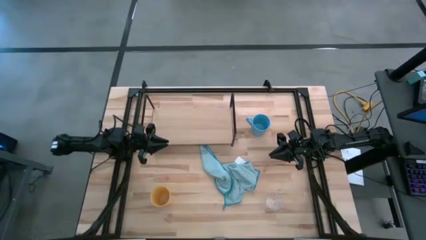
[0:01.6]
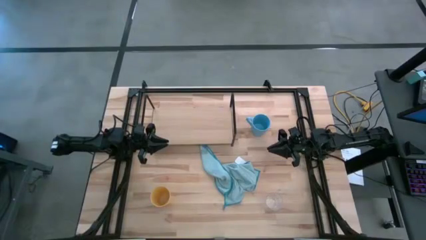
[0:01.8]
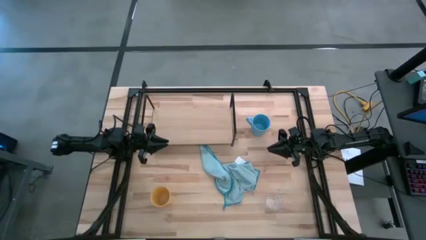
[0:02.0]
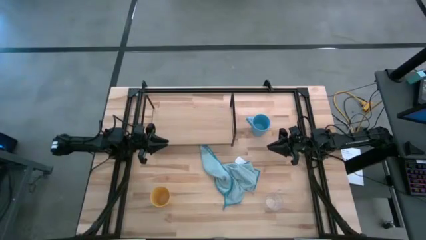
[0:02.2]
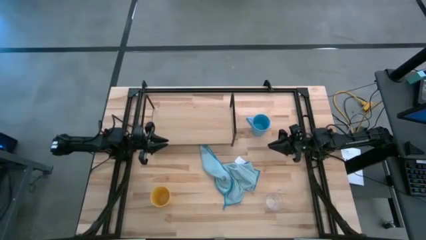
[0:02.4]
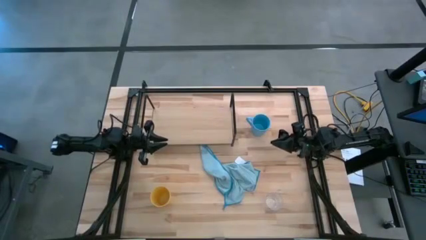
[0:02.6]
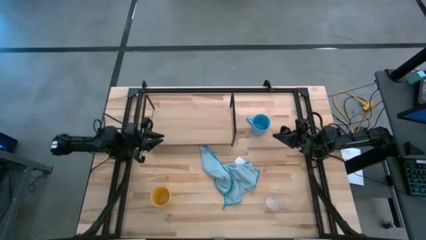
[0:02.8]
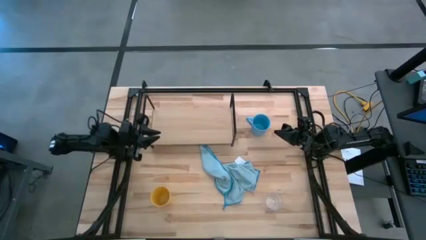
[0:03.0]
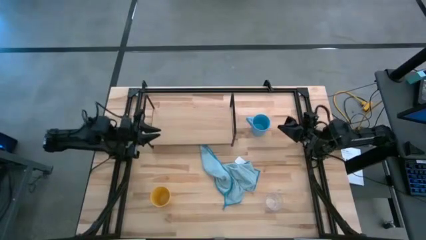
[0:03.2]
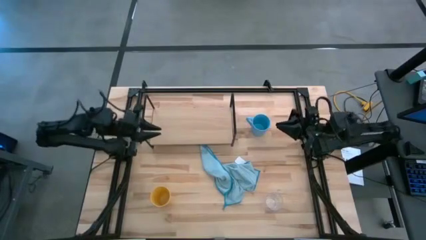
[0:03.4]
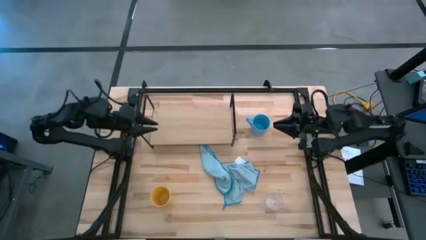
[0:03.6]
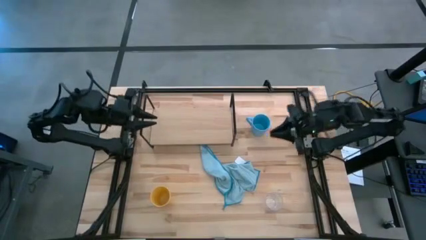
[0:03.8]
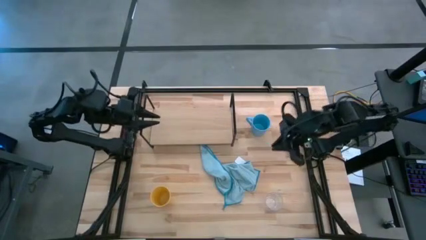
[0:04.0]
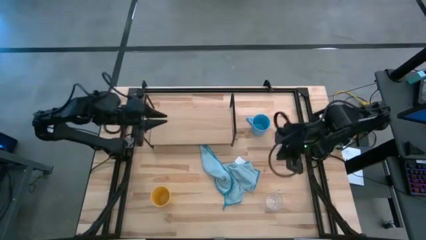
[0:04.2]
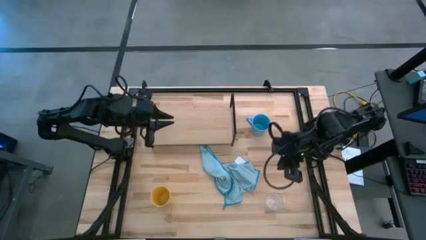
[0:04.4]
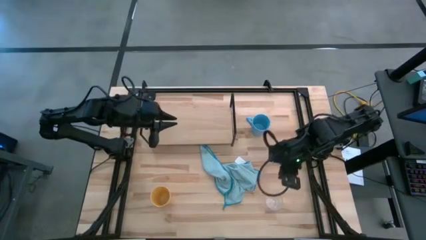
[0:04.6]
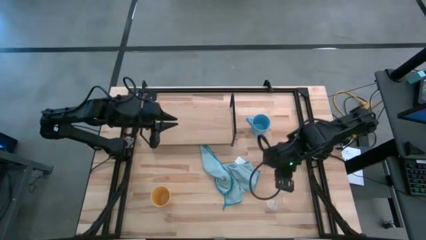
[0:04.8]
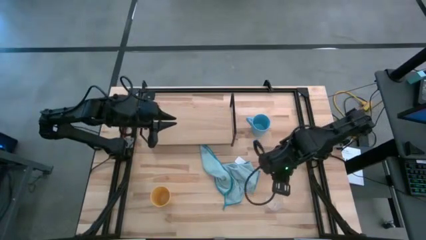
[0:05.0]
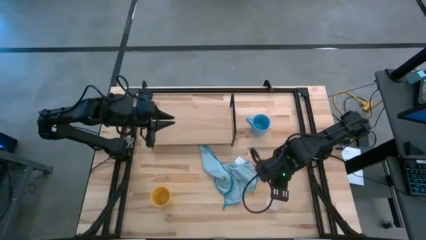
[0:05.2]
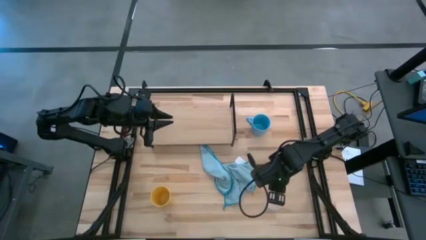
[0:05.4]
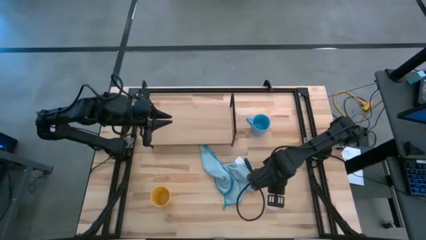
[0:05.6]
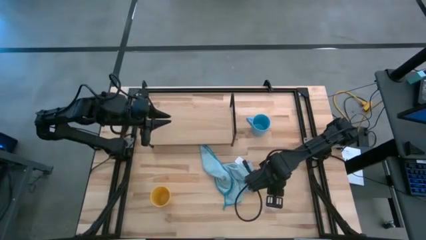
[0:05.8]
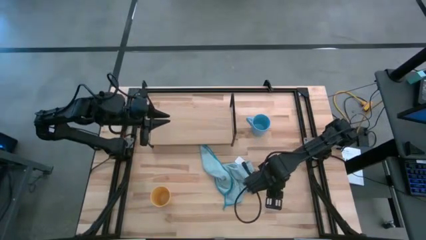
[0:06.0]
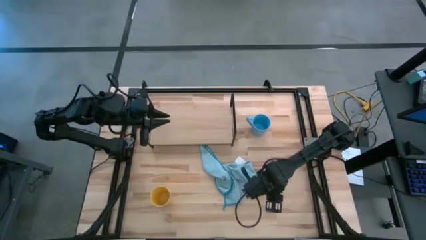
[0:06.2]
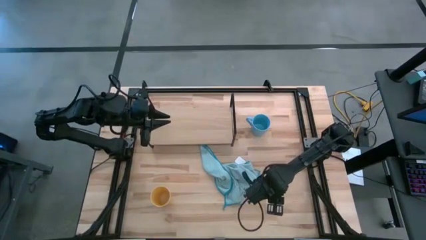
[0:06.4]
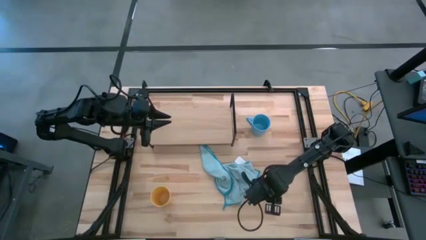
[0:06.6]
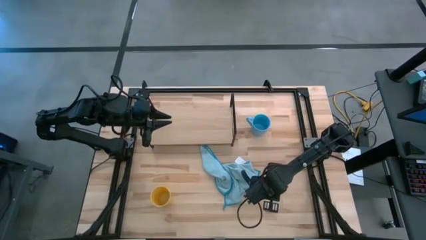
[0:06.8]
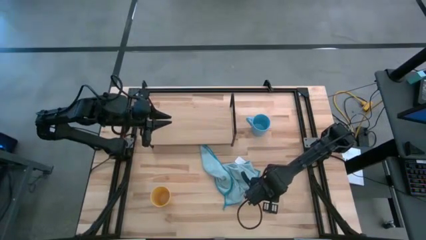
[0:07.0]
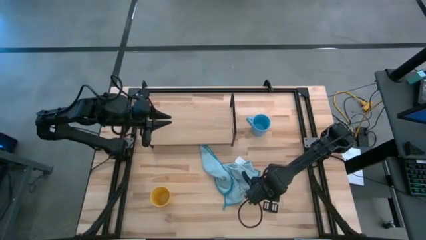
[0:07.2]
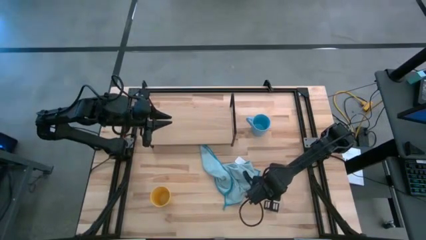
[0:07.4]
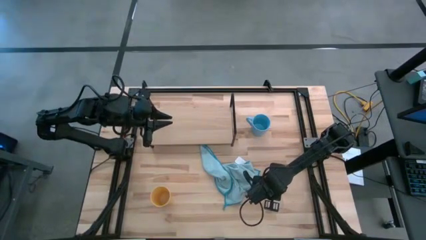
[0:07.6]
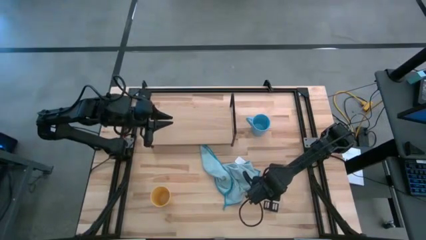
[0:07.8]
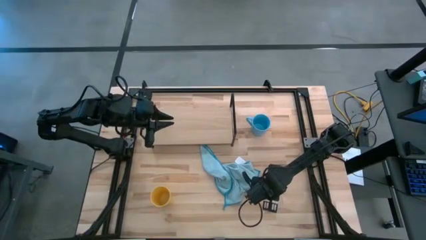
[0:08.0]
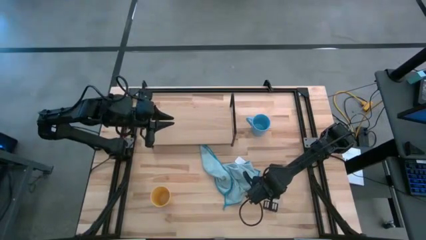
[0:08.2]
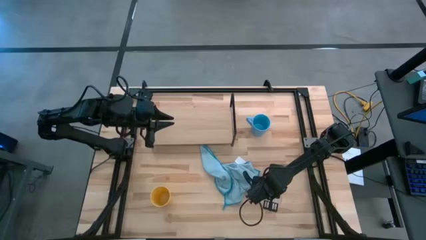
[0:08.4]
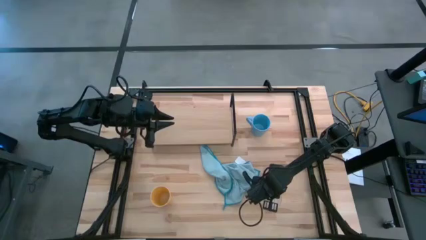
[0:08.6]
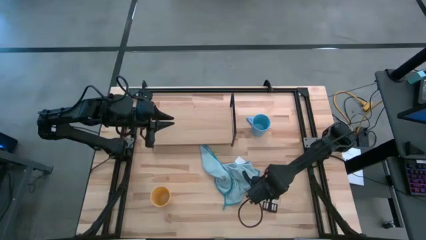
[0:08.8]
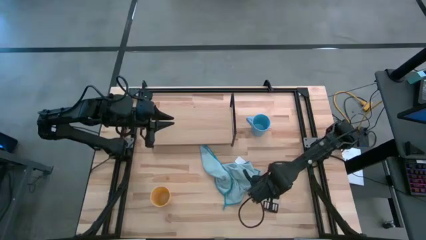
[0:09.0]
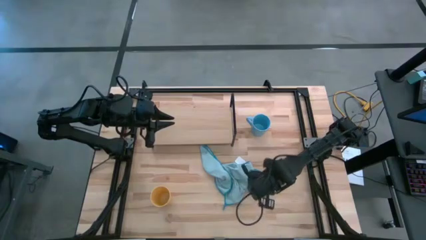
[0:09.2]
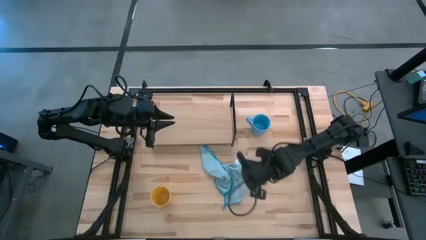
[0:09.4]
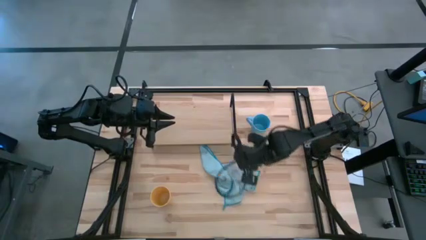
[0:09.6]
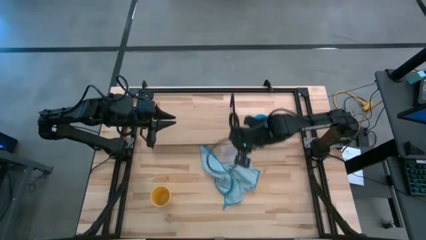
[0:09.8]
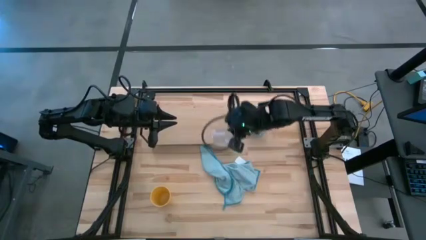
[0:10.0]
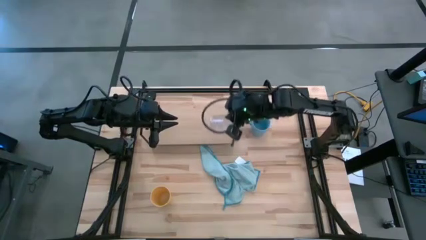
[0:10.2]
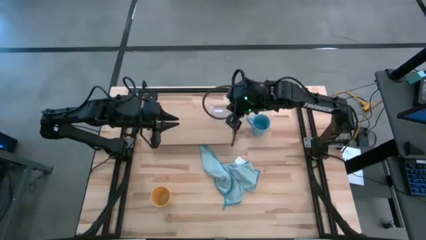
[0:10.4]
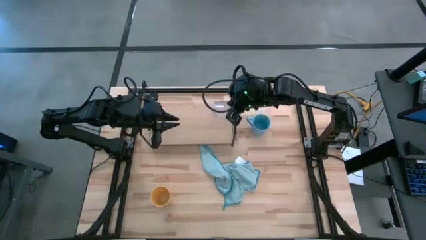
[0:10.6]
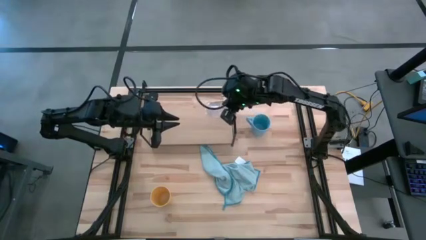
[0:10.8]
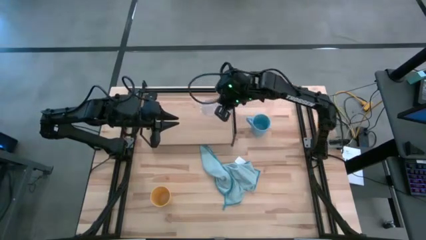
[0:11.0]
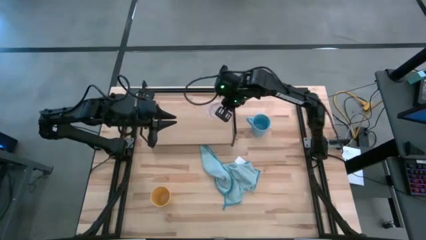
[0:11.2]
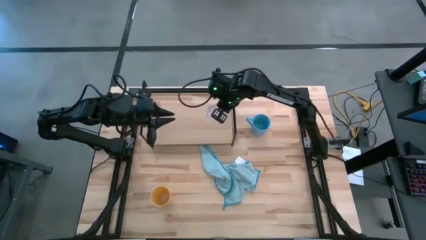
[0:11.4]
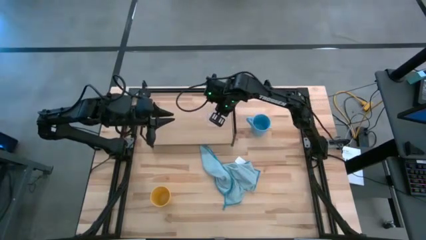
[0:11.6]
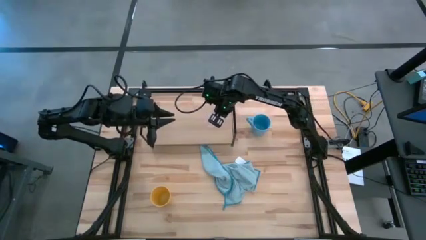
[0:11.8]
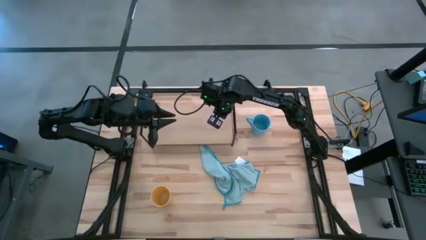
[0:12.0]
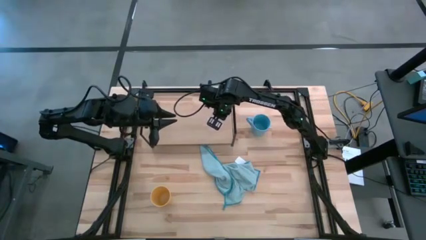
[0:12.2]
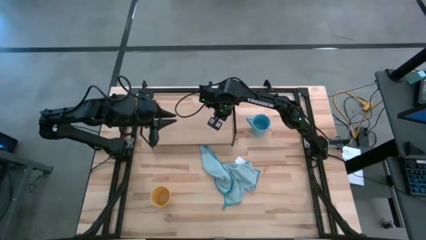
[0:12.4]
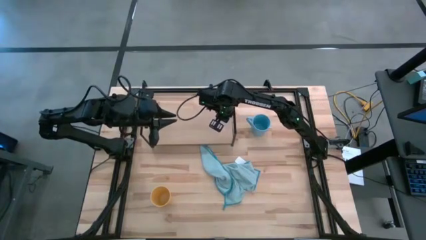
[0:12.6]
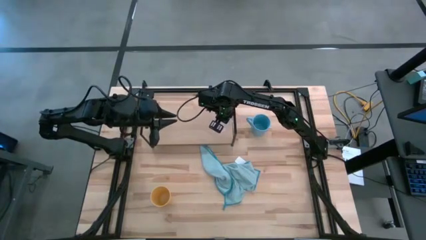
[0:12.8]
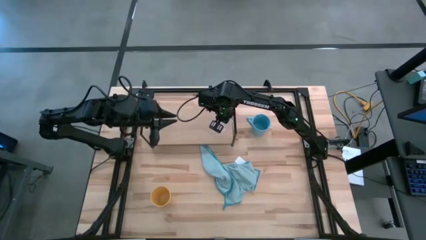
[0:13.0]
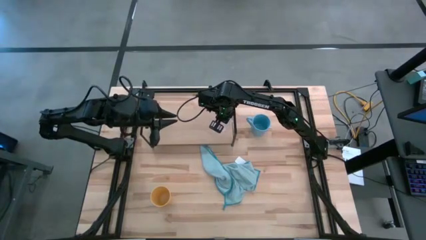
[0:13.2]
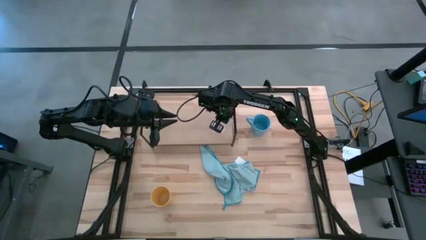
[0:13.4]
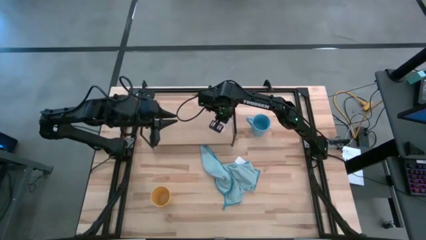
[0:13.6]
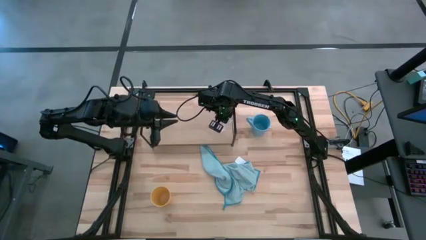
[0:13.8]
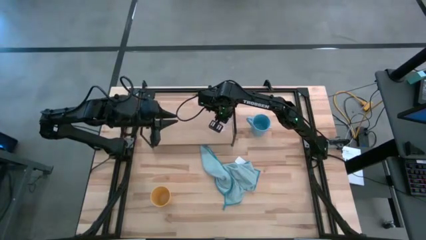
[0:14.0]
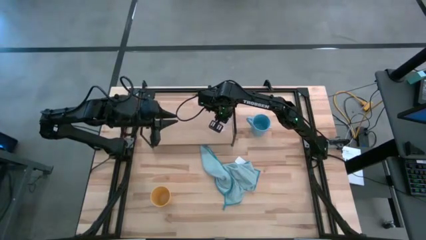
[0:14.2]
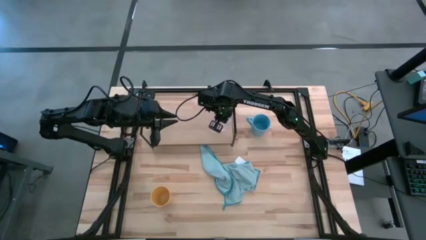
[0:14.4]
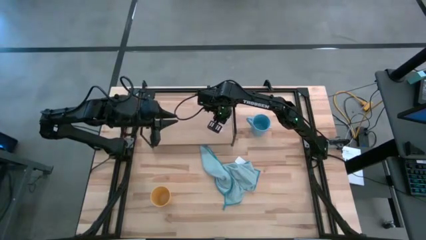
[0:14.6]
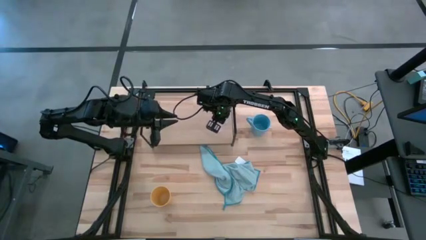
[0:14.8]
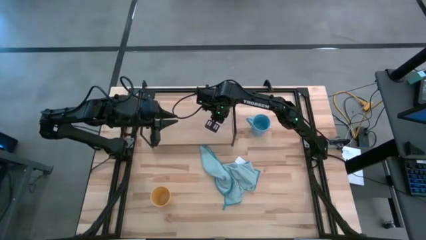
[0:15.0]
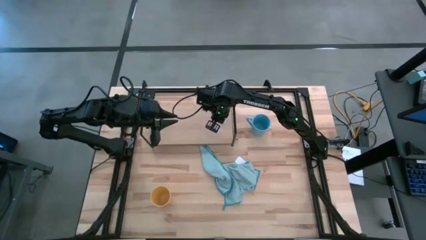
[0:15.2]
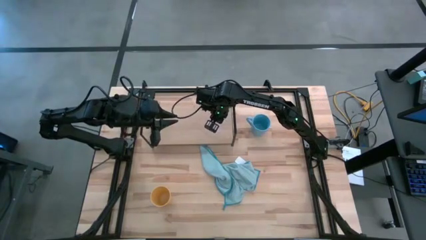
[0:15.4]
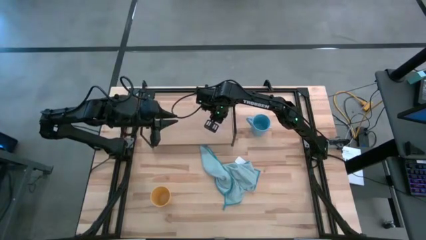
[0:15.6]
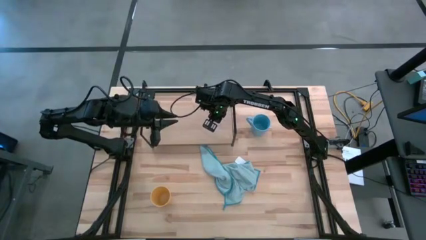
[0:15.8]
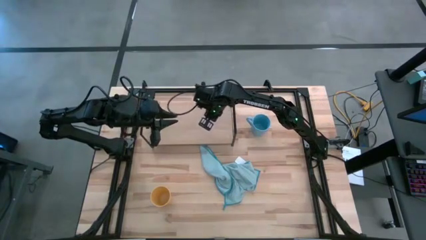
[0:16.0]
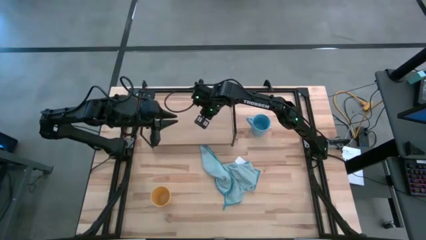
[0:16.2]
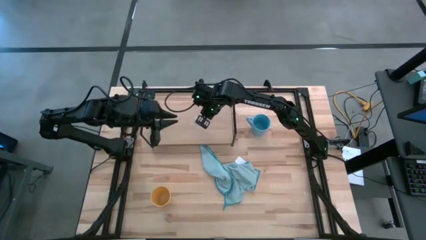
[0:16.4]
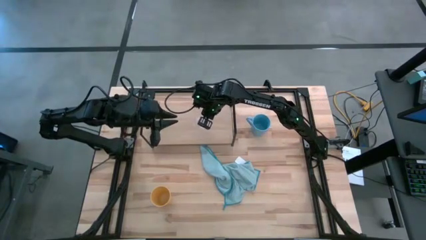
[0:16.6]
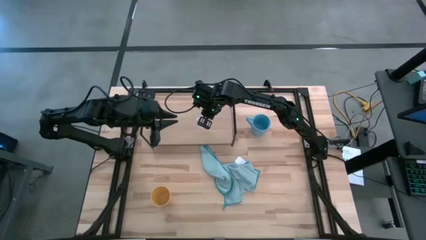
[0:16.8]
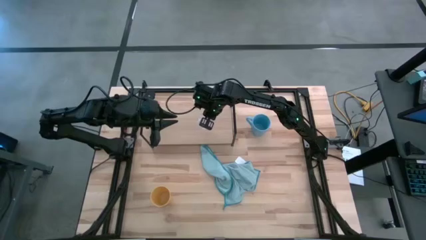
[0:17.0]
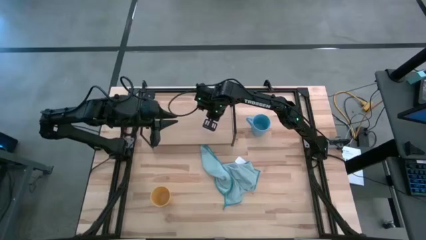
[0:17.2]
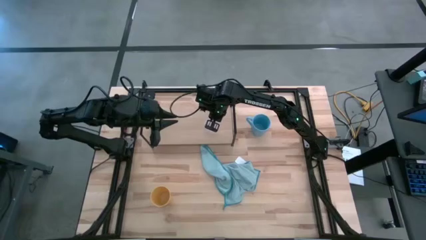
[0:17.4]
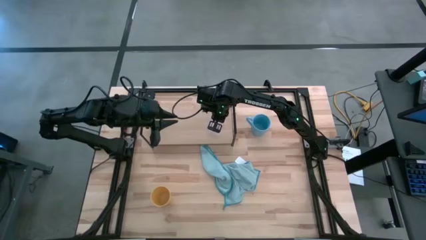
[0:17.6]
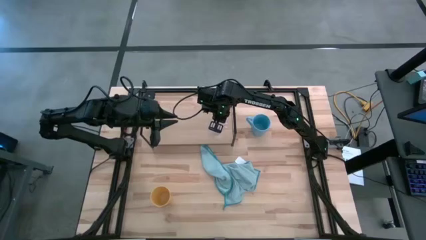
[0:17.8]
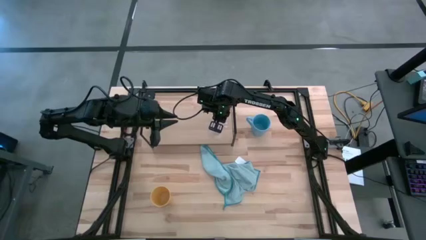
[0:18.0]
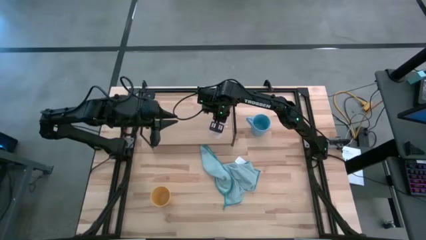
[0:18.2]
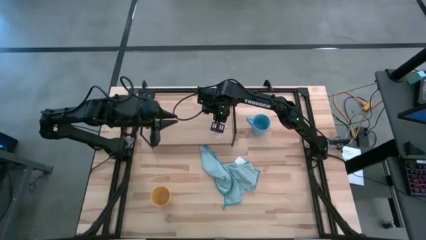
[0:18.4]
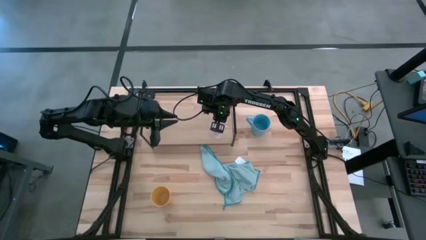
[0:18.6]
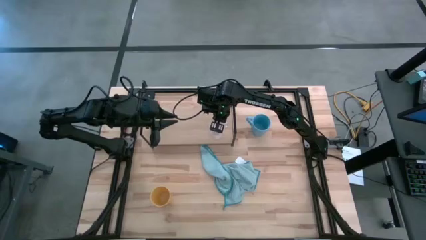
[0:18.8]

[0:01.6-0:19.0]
Task: Stack small to large cups/mugs on shelf
Put the transparent cup on the shelf
